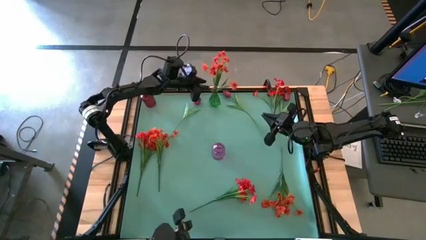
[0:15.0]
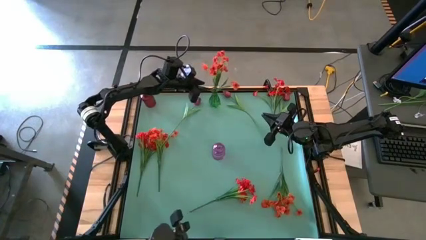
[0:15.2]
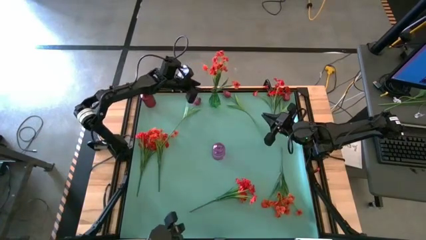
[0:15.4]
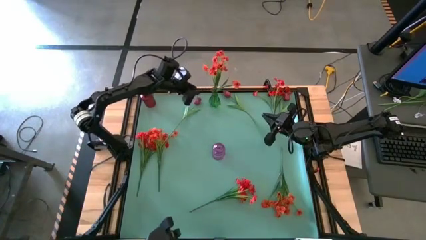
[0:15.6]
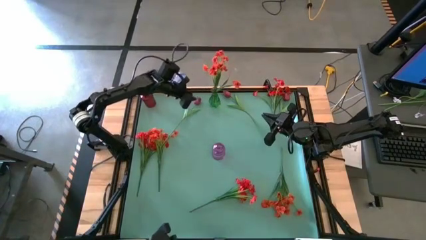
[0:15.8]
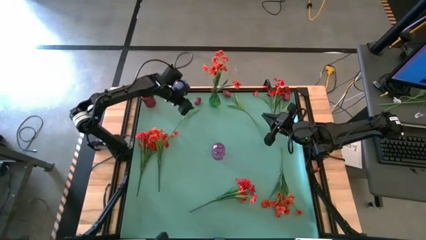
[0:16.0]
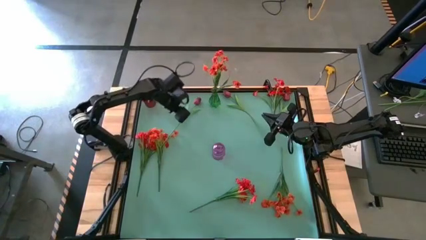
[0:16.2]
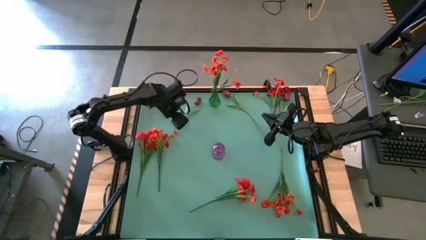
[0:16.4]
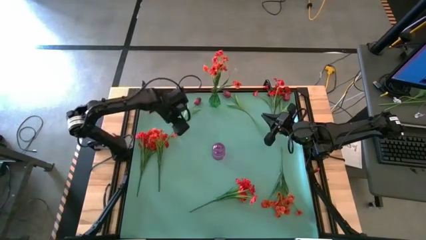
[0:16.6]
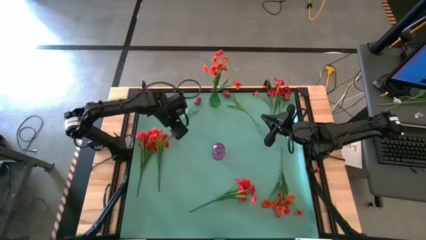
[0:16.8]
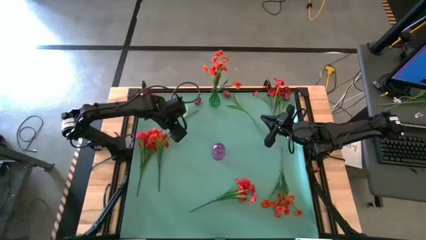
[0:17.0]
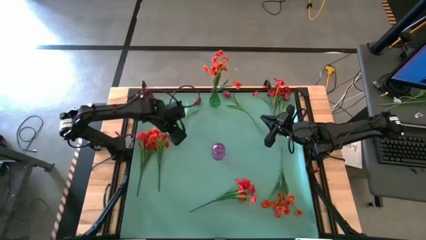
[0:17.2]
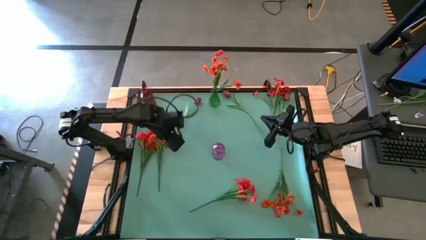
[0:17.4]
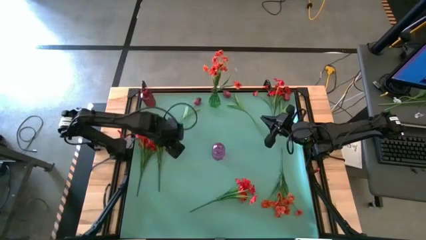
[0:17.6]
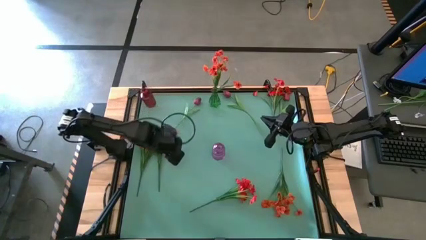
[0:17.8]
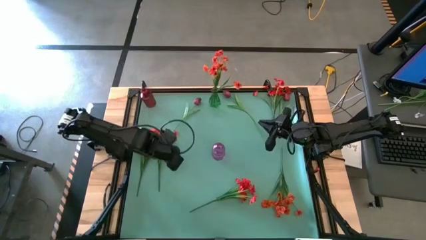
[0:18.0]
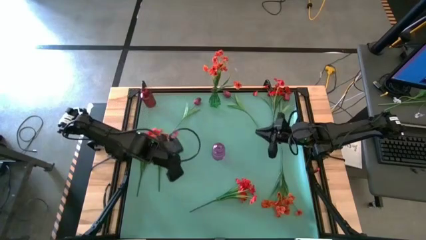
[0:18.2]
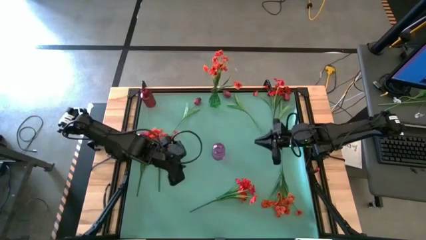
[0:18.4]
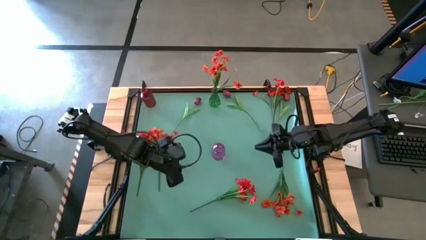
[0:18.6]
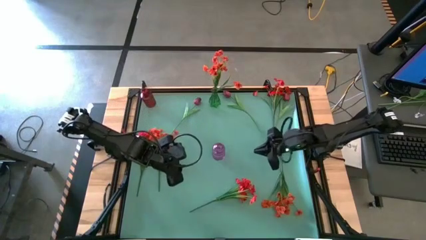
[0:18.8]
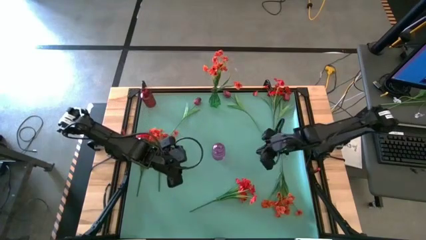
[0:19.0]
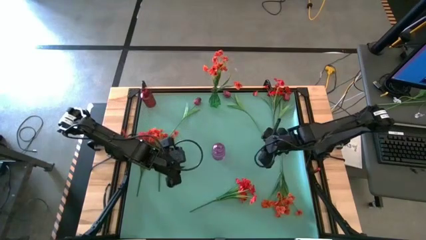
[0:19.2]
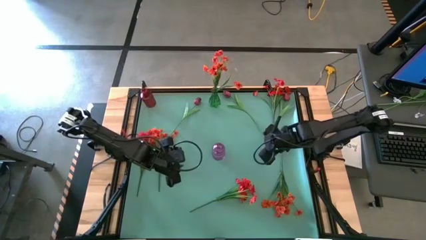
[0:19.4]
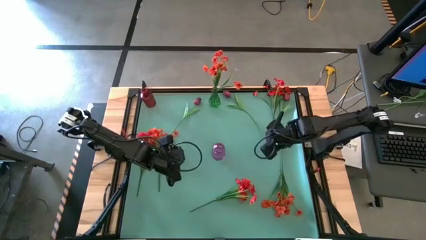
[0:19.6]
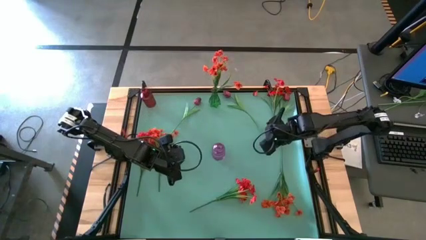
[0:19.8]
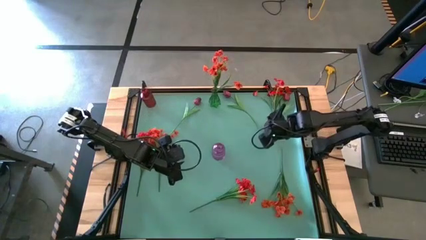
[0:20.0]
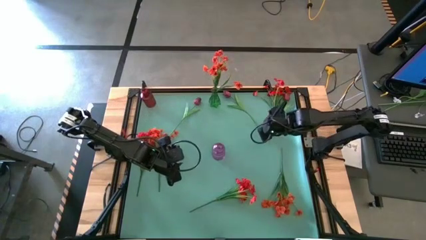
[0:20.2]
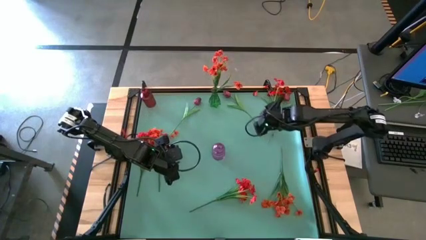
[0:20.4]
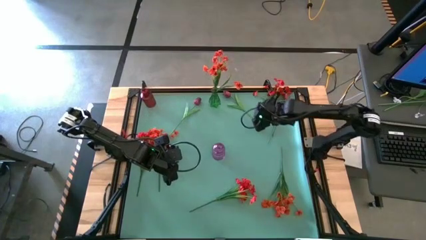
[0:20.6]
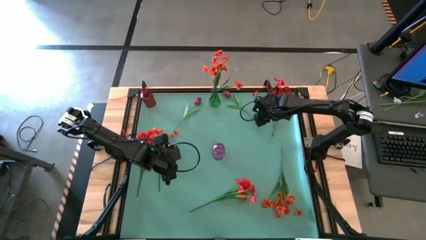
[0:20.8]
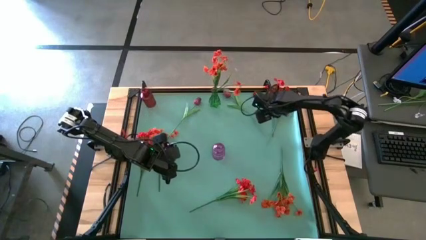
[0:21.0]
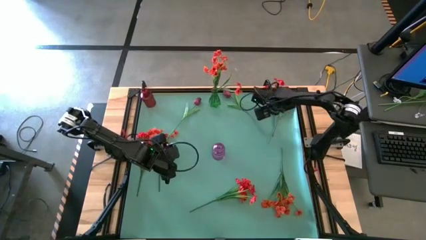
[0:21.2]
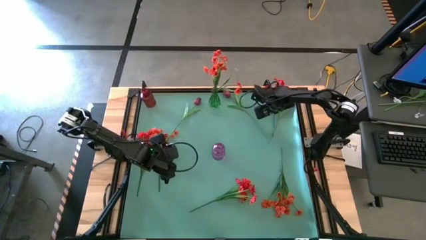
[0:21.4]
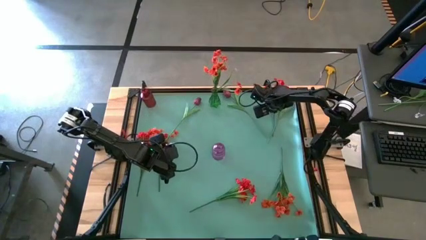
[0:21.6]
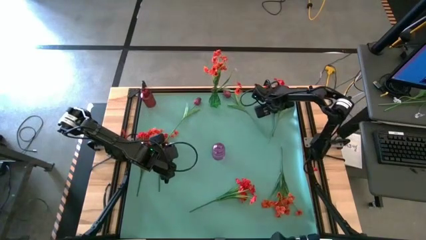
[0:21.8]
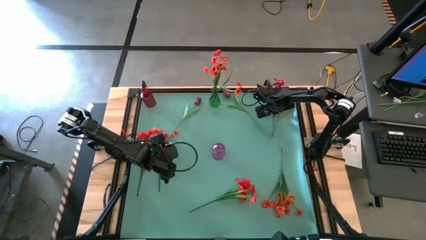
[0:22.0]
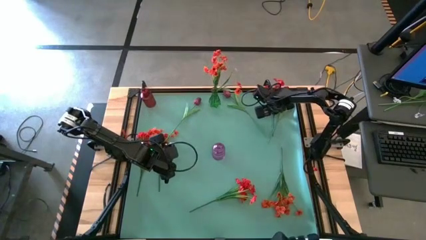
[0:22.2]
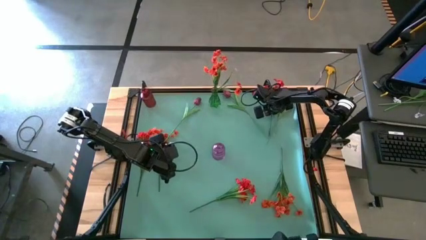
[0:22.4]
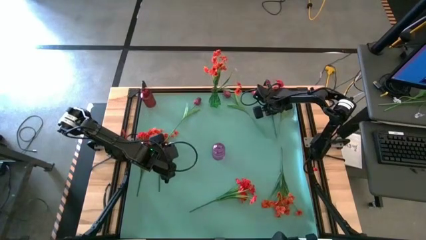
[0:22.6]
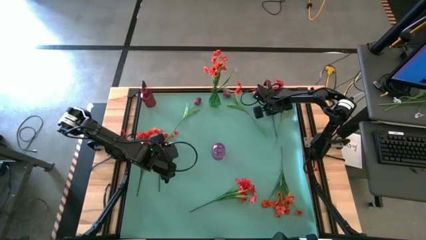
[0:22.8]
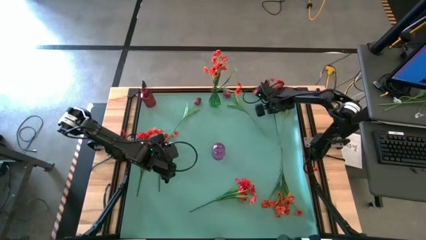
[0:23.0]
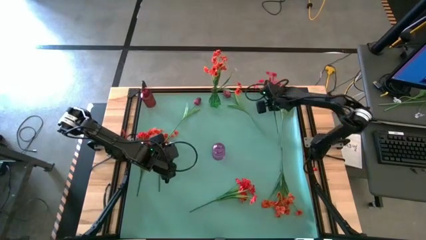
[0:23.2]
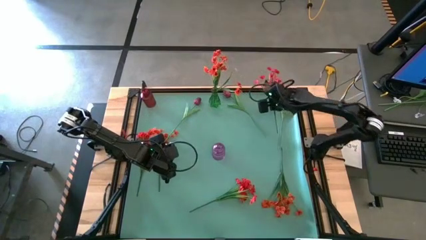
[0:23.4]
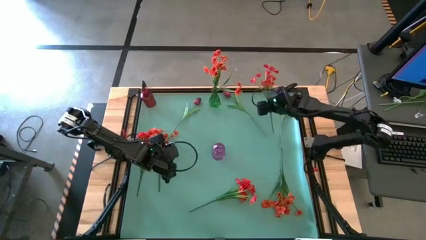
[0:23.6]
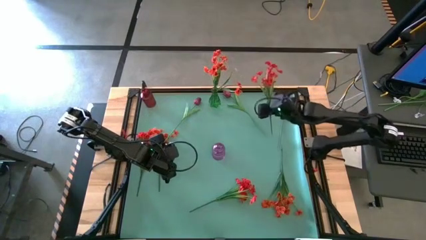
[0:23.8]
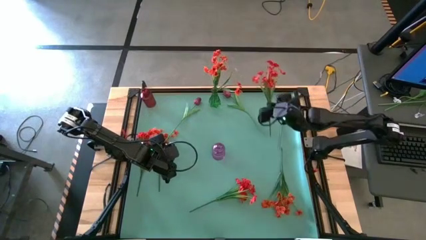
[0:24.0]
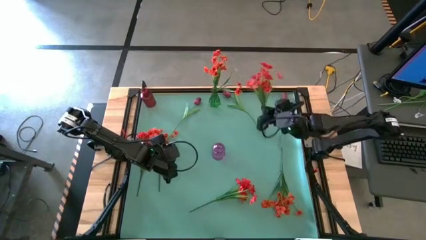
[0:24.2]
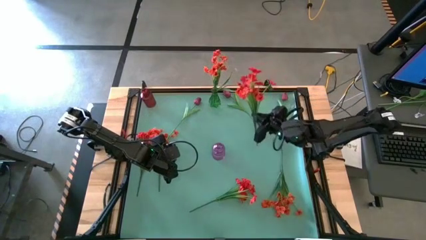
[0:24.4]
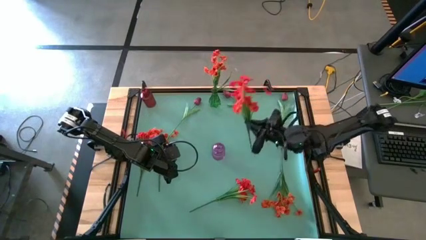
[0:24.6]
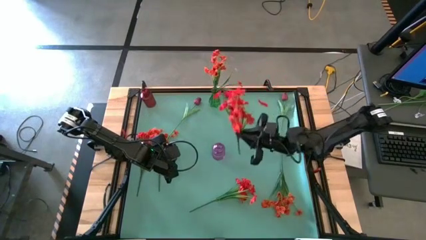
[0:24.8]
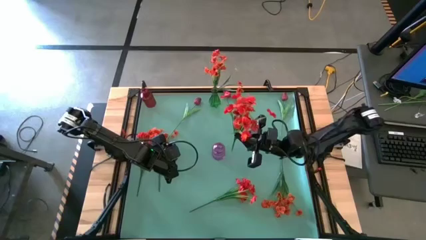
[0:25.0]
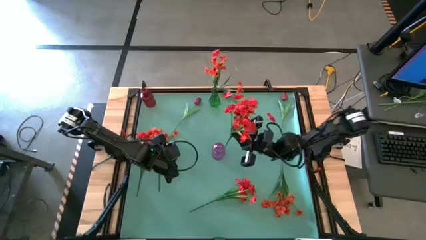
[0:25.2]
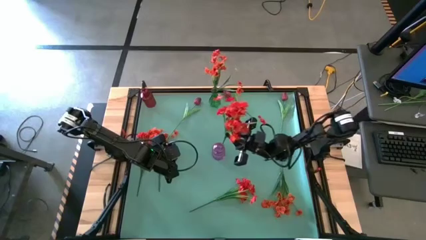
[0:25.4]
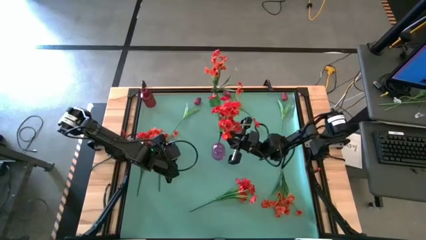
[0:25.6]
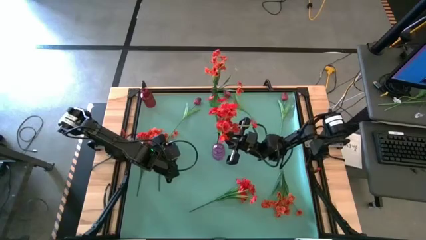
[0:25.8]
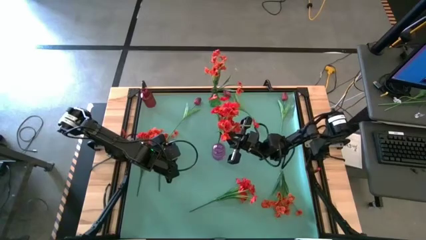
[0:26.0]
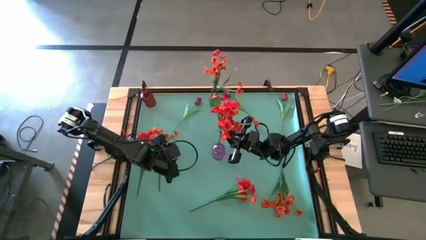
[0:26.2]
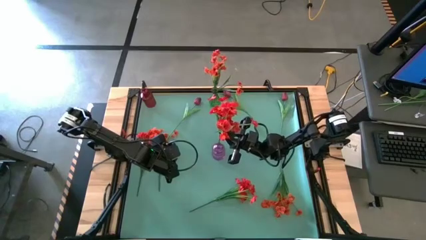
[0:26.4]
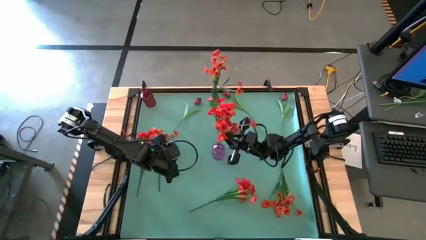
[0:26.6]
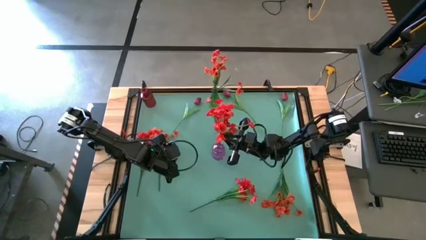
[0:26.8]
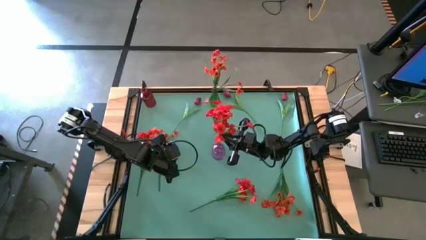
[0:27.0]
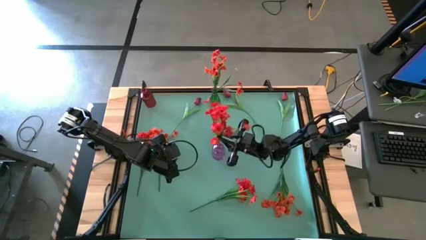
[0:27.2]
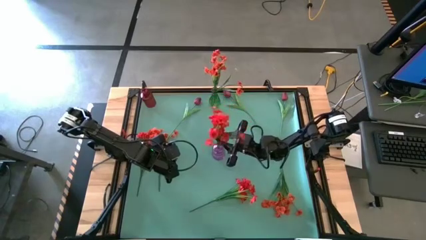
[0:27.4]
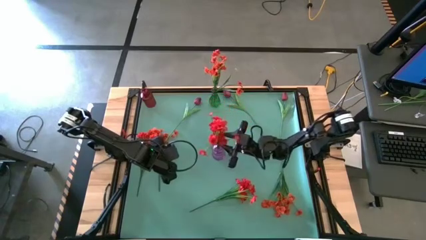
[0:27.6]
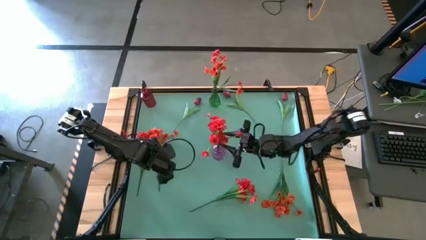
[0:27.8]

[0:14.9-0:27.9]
Task: Sort flowers into vase by color
Put the orange flowers into the purple vase
